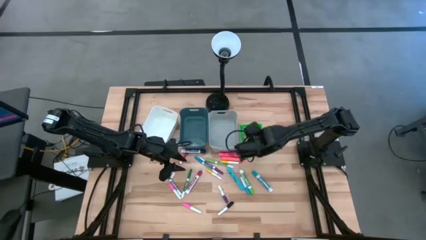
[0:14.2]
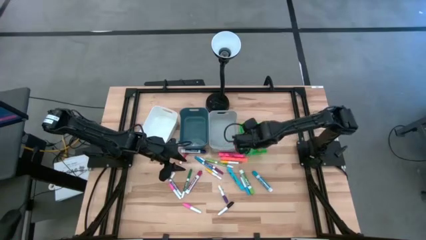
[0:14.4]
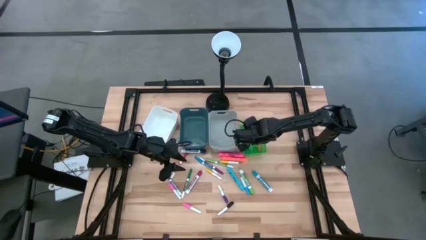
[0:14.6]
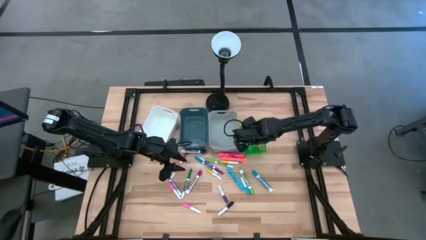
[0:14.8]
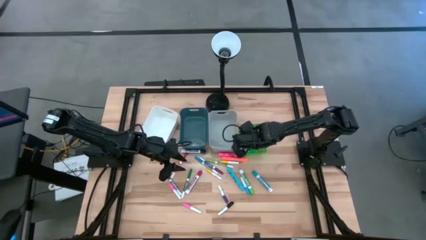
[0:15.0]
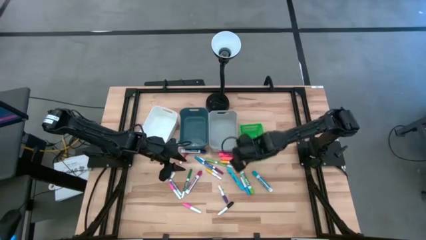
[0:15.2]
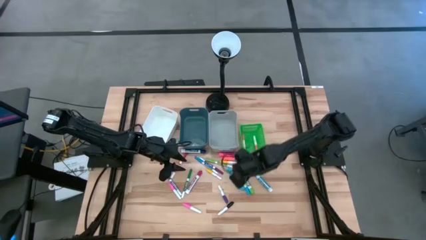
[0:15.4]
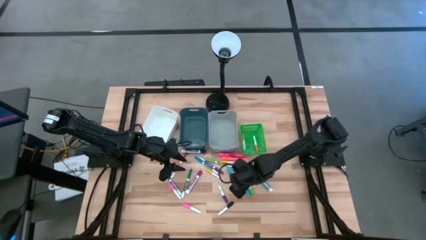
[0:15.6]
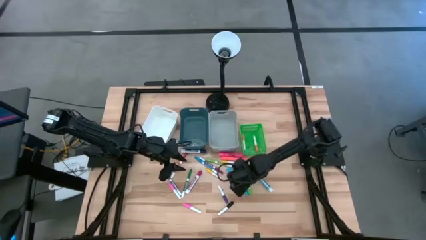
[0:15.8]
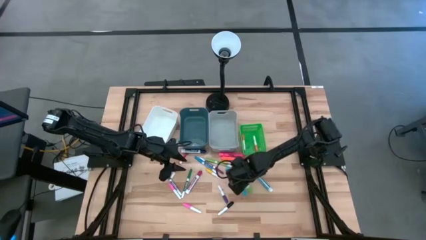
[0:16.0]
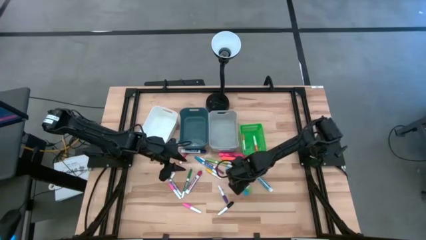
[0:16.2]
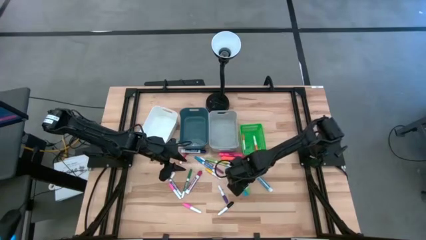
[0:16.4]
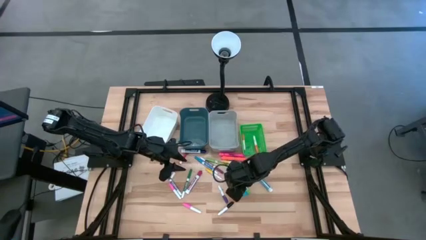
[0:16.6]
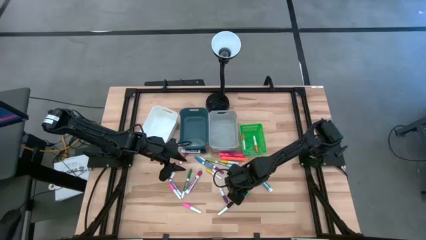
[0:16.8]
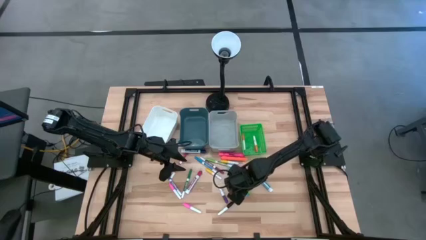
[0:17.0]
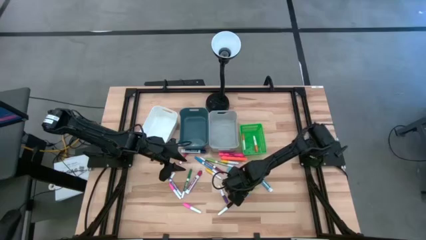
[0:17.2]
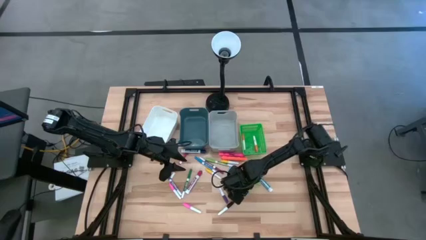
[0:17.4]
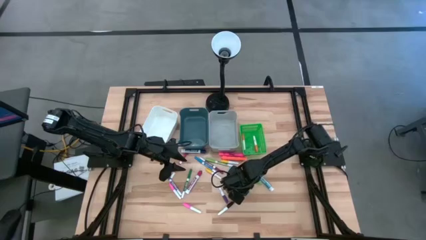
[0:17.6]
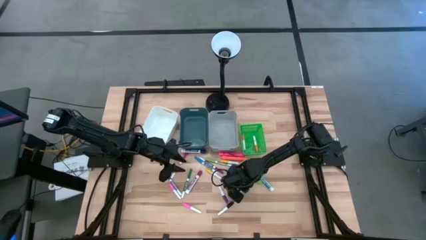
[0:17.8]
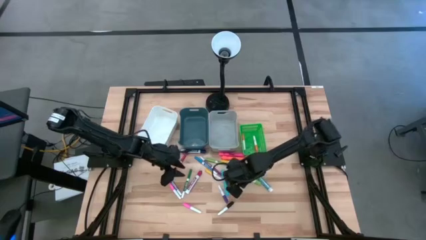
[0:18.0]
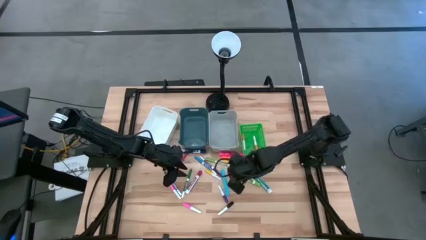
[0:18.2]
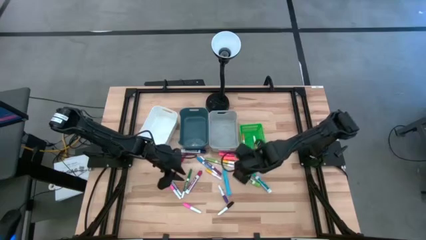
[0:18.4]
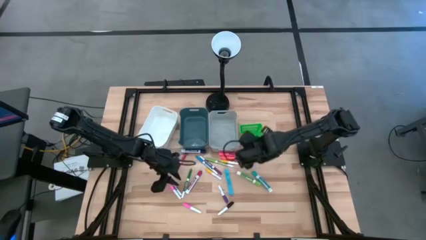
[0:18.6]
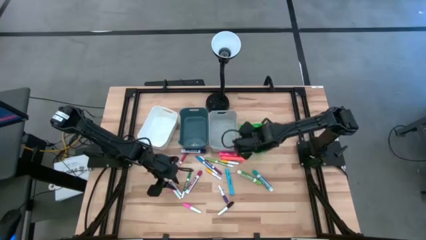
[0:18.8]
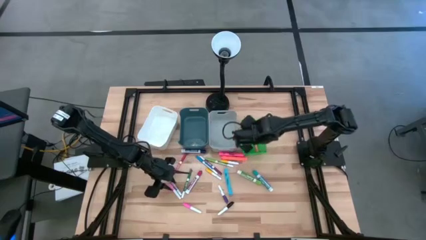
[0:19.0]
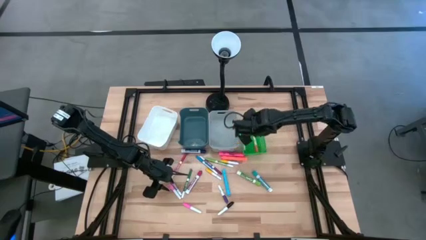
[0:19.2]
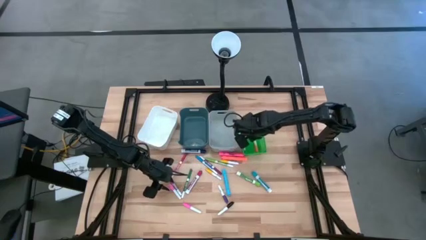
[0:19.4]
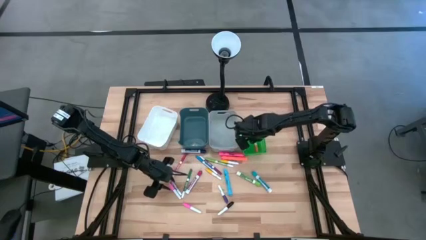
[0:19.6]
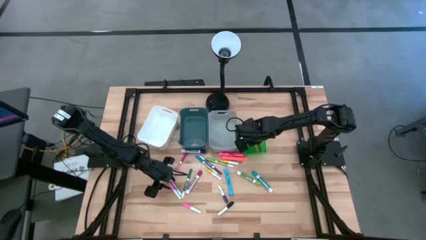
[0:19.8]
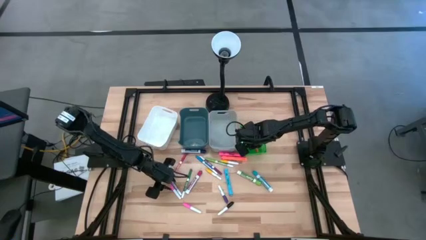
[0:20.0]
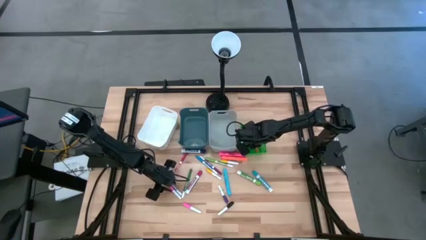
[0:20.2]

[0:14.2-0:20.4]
Task: Pick & Place Markers
Put the small blue highlighter pen into the green bin

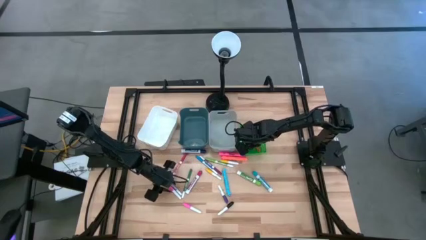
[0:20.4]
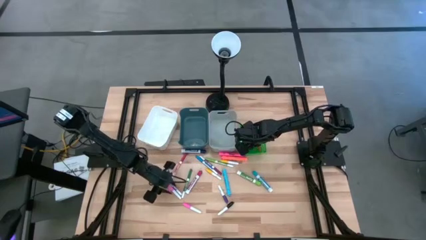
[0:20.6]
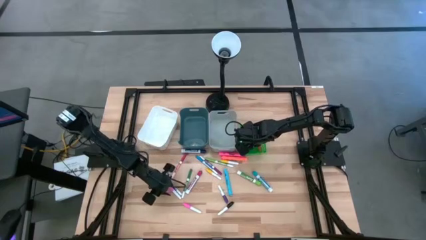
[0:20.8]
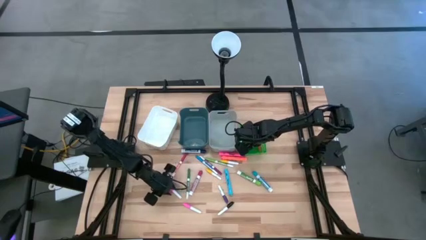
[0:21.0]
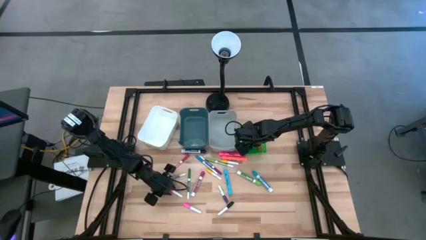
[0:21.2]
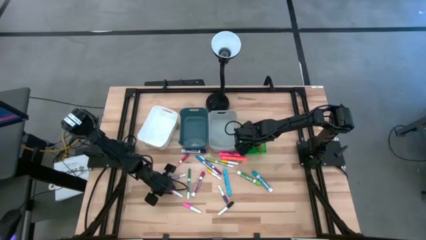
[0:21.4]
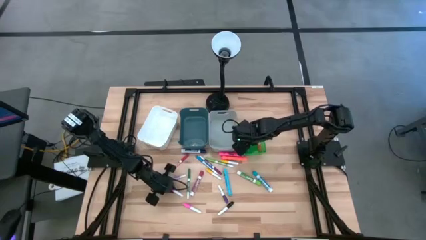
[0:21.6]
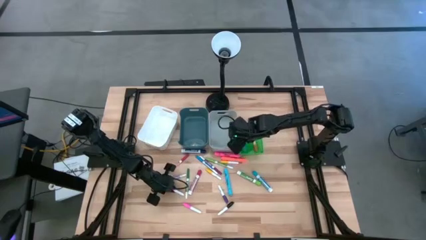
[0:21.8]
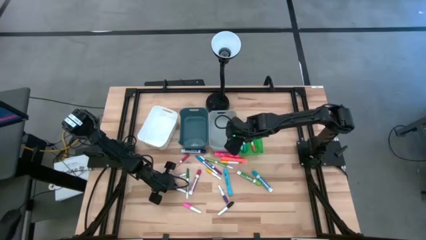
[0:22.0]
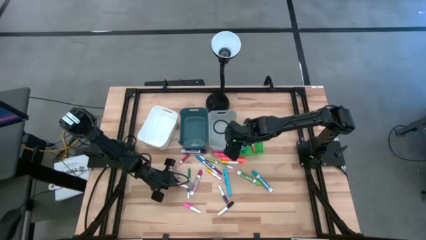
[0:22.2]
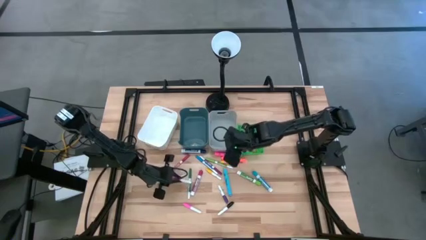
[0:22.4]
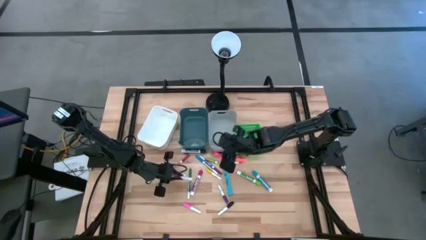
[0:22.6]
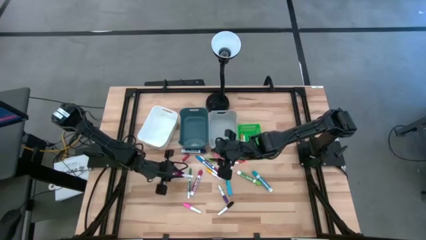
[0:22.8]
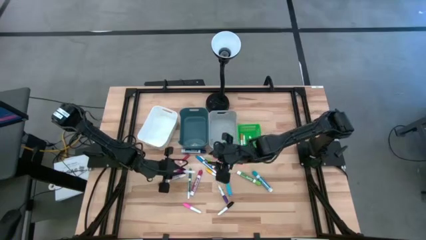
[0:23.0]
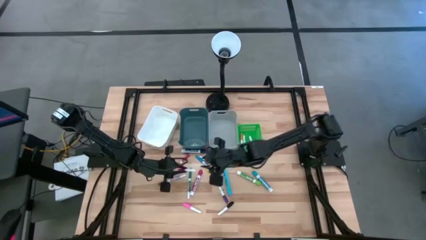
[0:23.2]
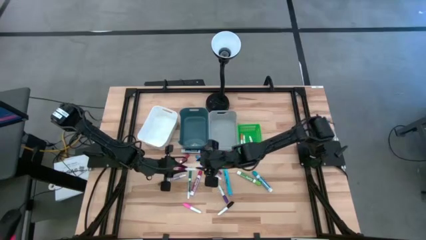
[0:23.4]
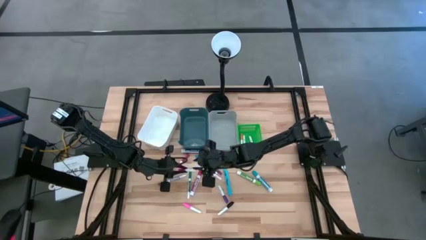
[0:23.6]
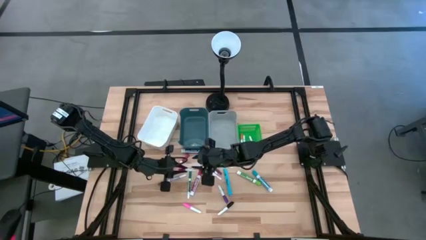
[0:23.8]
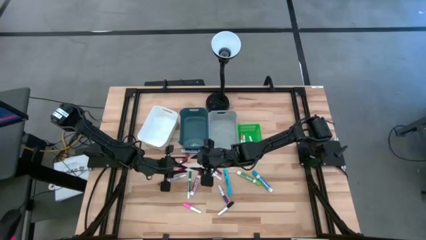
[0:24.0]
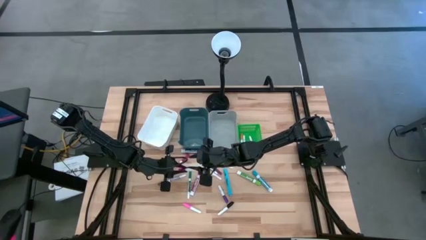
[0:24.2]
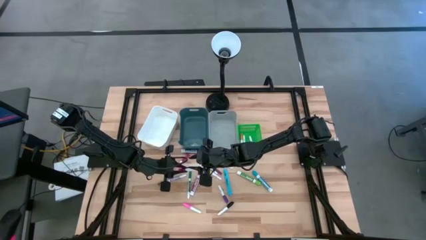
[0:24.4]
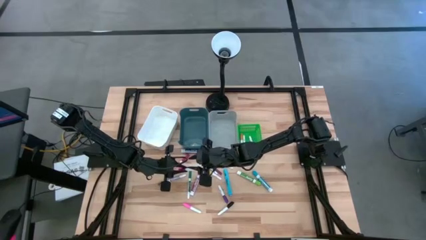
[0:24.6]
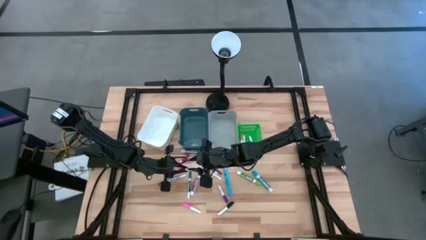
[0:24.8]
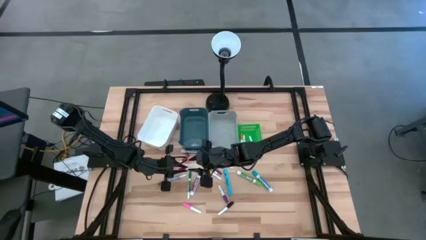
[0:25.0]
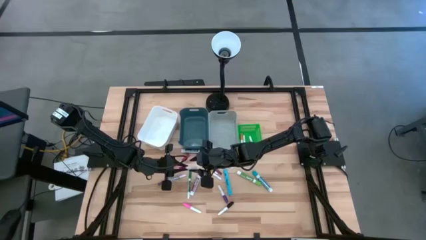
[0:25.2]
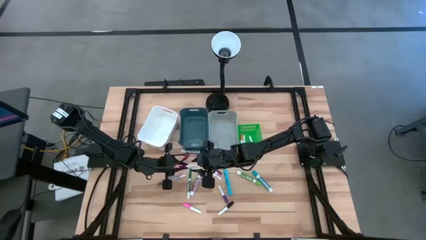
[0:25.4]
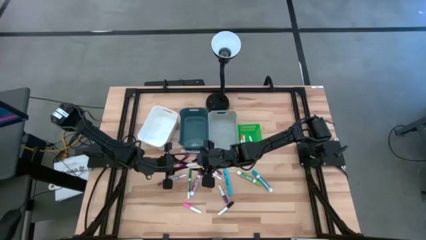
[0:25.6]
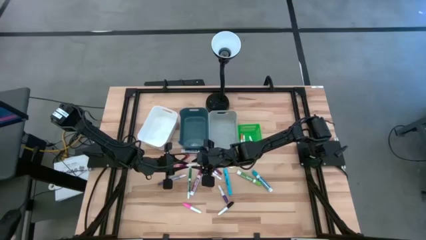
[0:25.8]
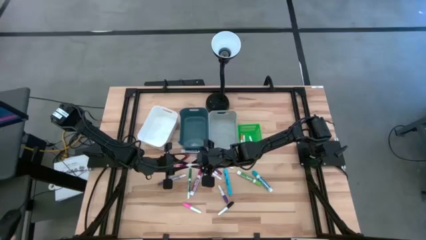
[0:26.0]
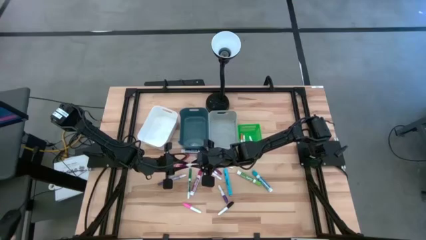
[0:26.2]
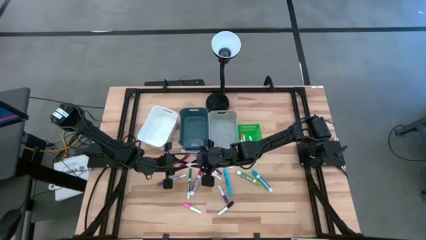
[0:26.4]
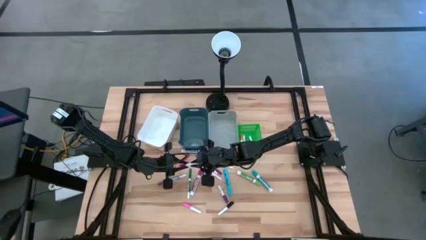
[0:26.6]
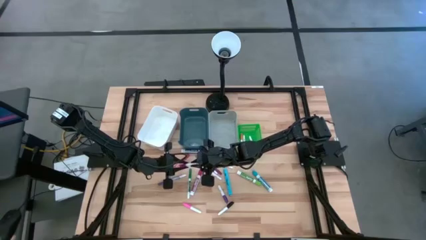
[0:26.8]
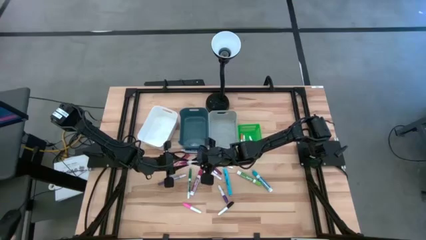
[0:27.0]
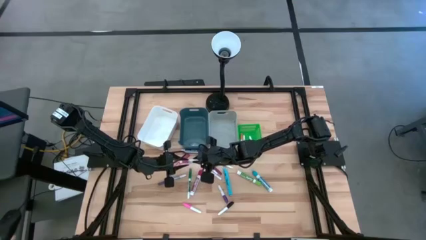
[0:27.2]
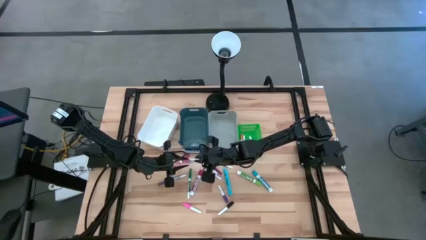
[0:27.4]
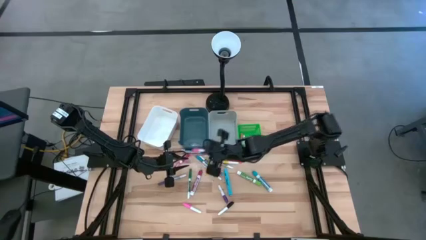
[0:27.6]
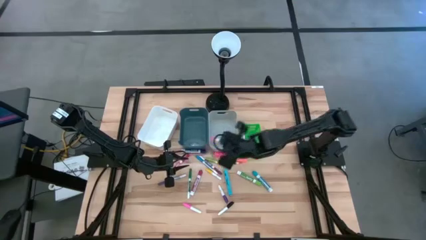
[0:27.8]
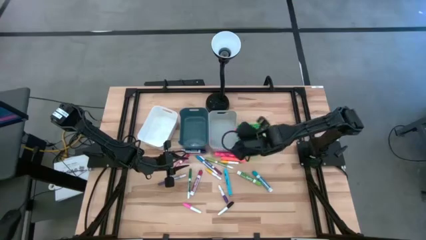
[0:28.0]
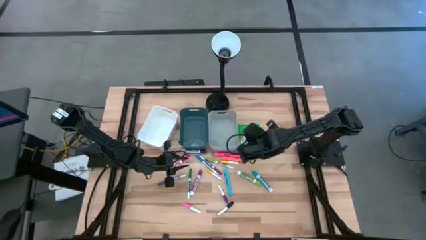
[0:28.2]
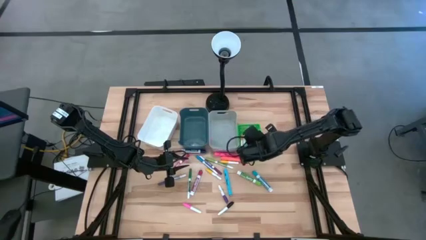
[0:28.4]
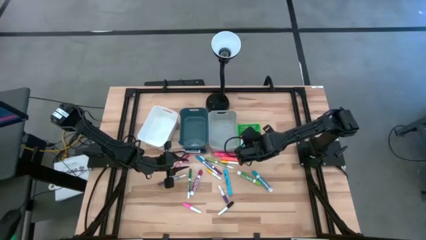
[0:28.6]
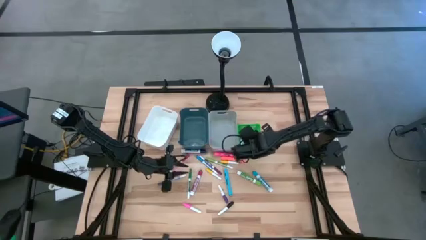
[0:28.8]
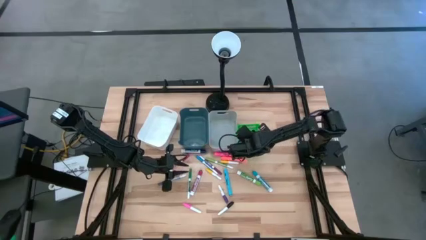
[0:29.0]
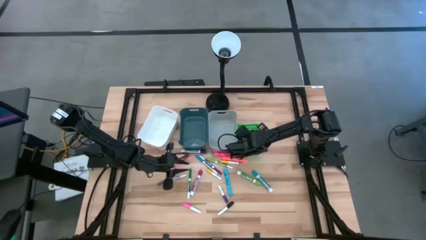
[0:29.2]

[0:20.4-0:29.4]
Put the top small pink highlighter pen into the green bin

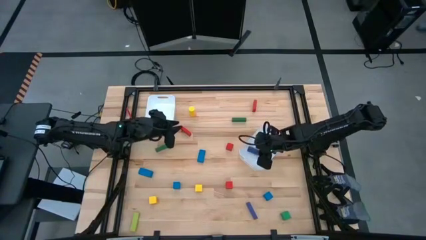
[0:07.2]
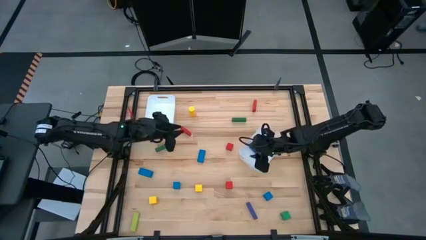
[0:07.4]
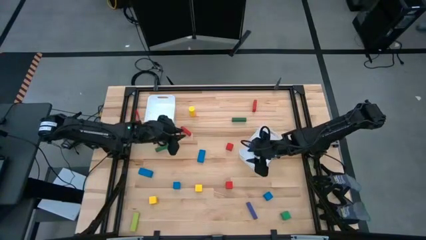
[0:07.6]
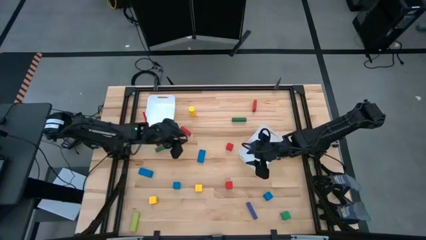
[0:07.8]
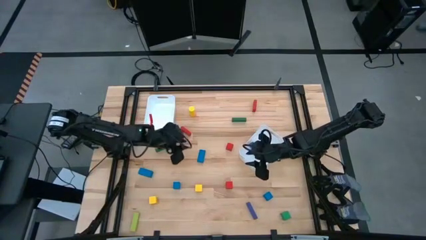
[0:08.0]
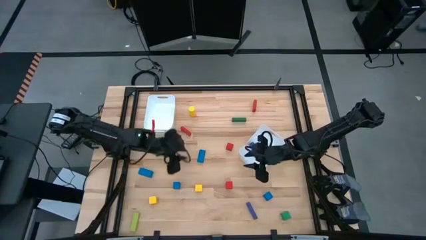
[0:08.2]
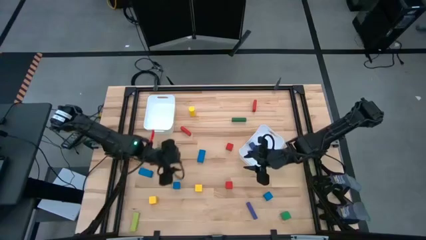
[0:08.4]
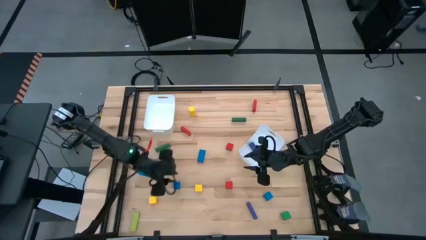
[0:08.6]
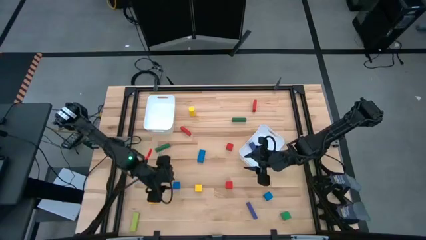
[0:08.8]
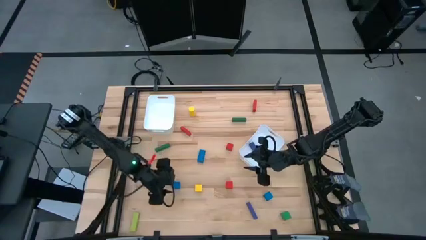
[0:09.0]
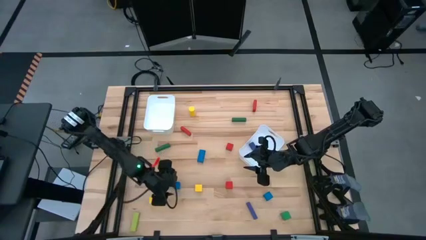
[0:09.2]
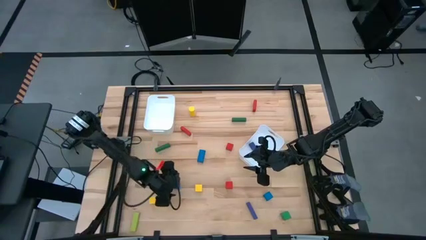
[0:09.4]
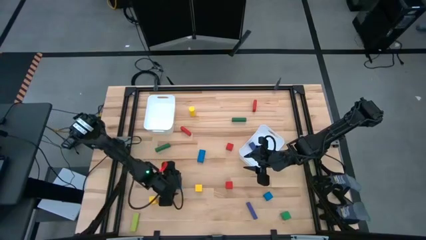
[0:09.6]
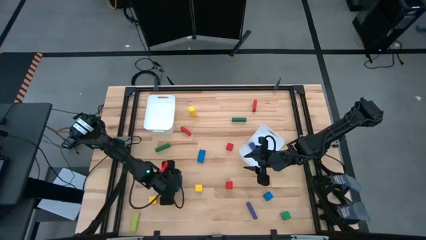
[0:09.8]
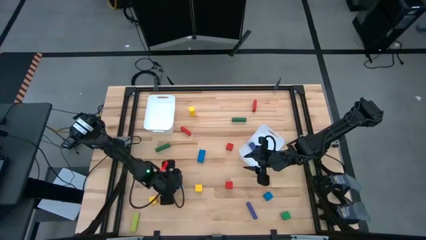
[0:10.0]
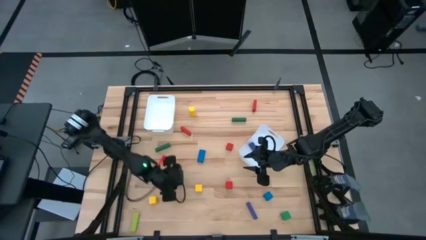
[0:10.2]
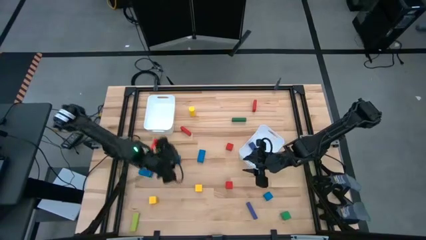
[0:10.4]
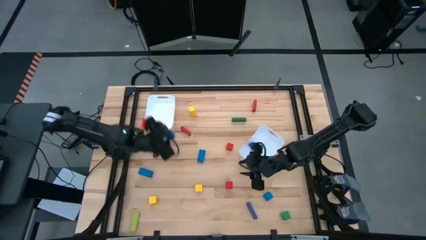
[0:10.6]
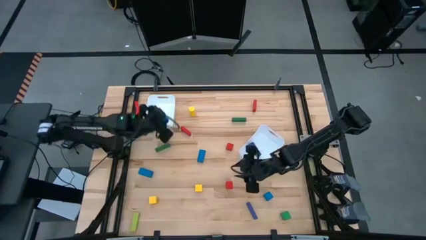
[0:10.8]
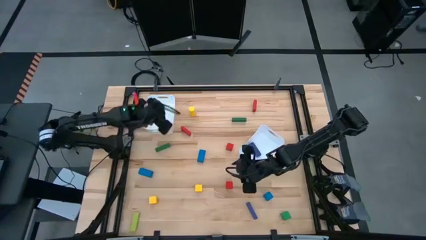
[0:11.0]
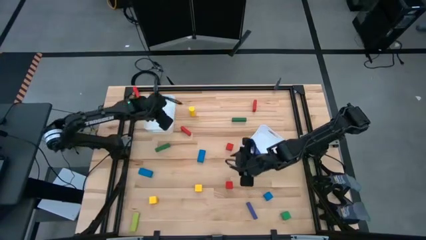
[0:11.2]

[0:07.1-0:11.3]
Task: Sort blocks by size
Put the left blue square block into the left white bin
